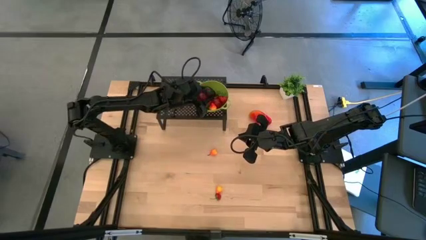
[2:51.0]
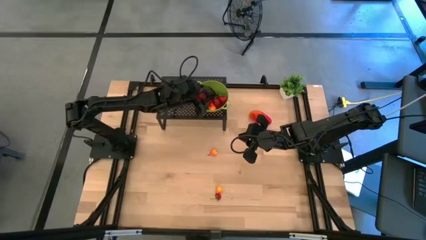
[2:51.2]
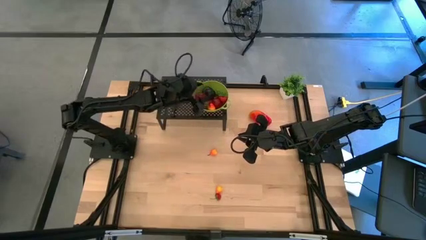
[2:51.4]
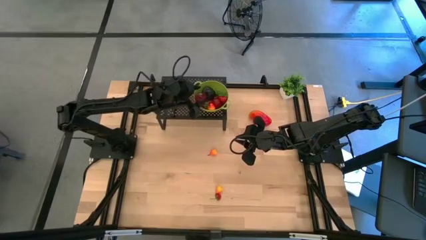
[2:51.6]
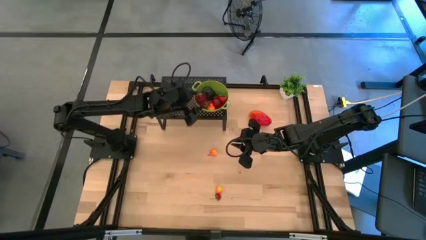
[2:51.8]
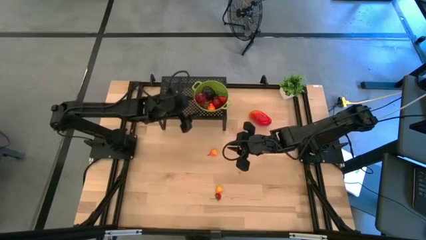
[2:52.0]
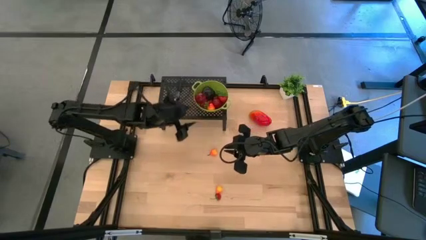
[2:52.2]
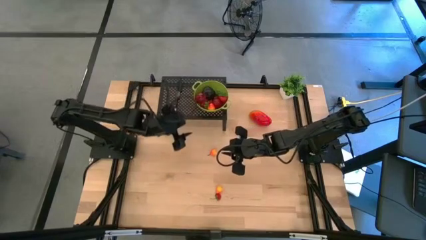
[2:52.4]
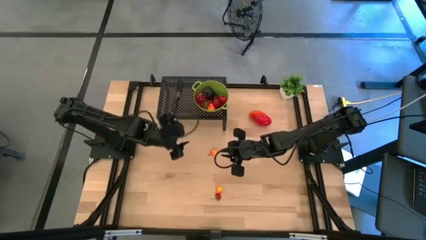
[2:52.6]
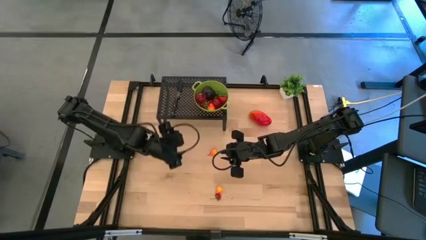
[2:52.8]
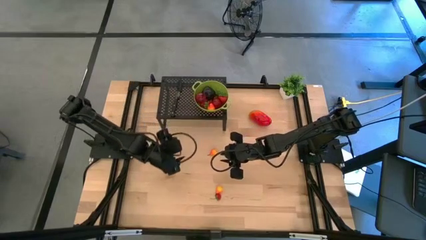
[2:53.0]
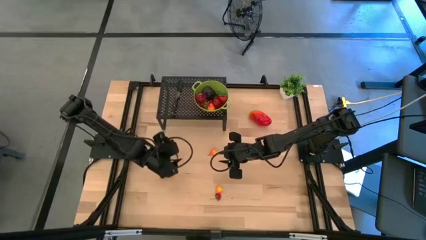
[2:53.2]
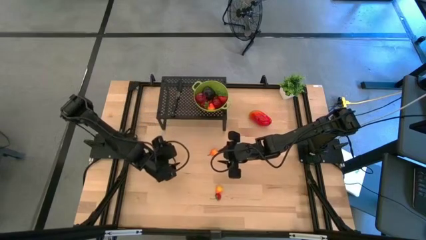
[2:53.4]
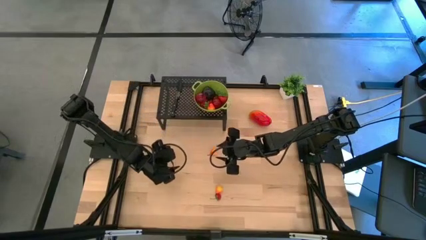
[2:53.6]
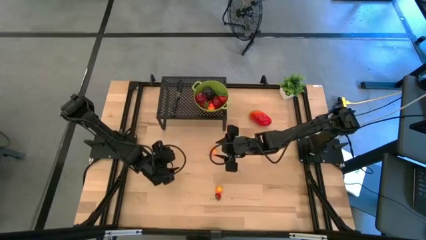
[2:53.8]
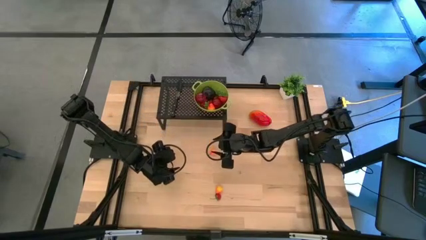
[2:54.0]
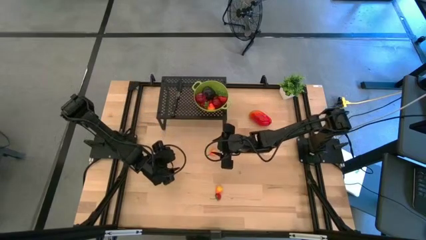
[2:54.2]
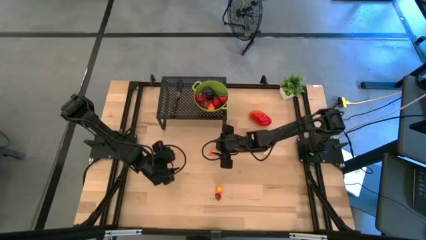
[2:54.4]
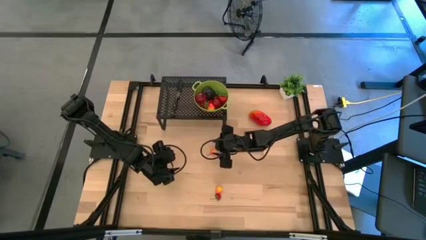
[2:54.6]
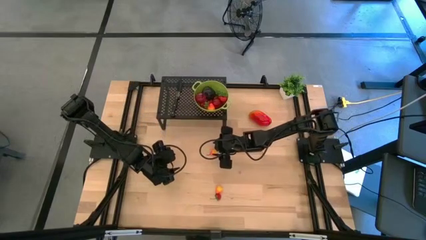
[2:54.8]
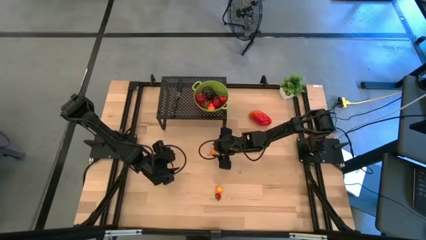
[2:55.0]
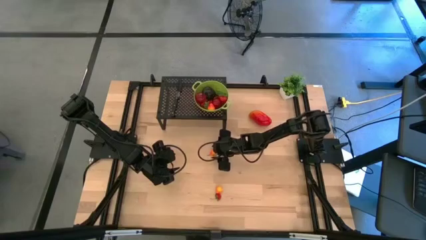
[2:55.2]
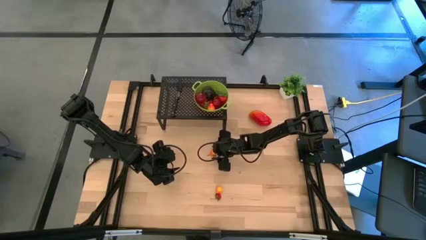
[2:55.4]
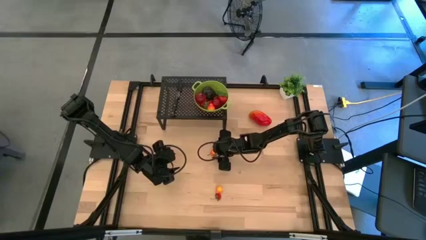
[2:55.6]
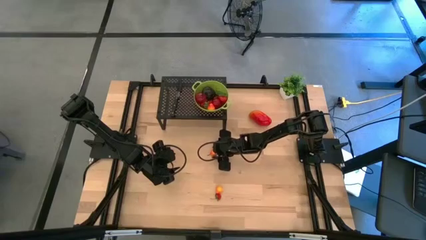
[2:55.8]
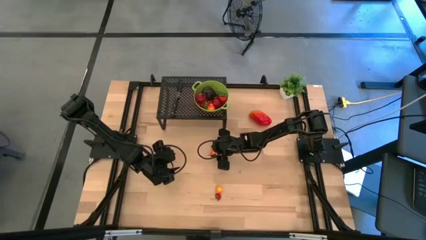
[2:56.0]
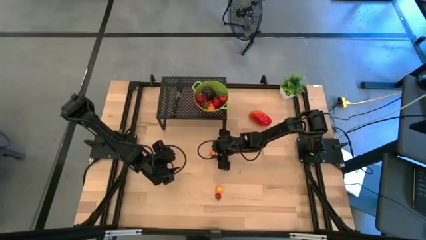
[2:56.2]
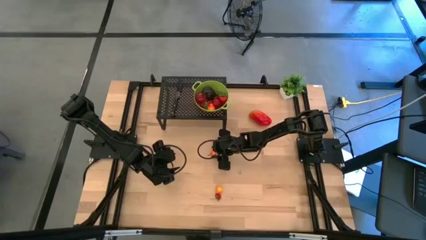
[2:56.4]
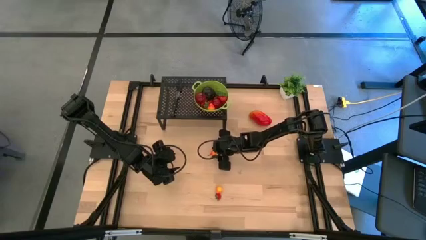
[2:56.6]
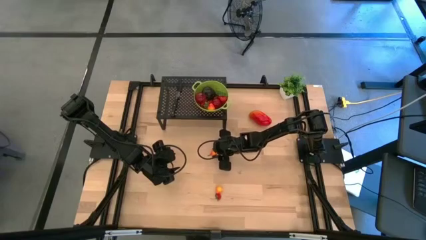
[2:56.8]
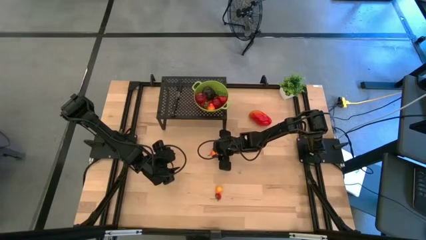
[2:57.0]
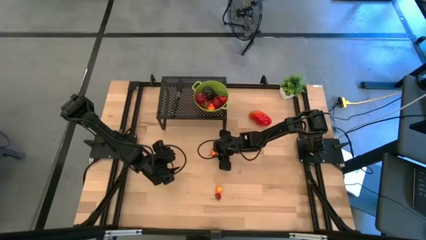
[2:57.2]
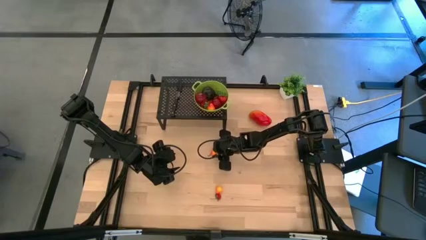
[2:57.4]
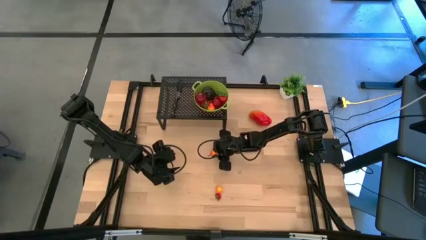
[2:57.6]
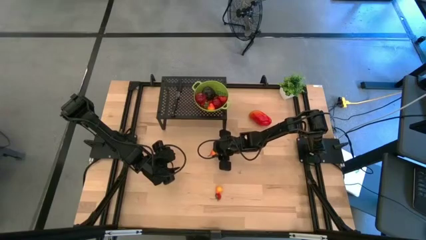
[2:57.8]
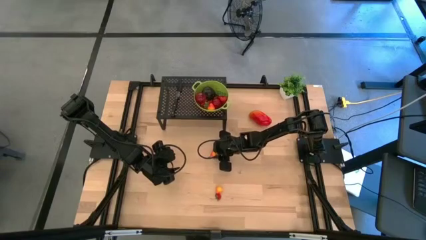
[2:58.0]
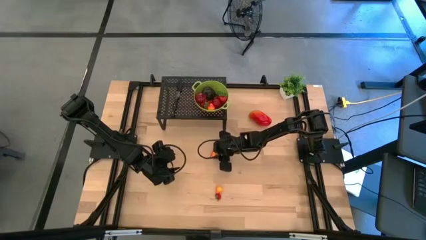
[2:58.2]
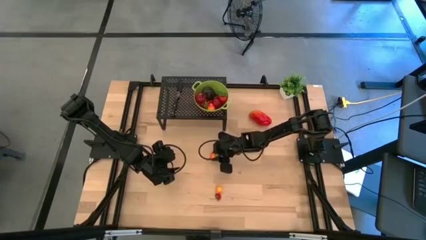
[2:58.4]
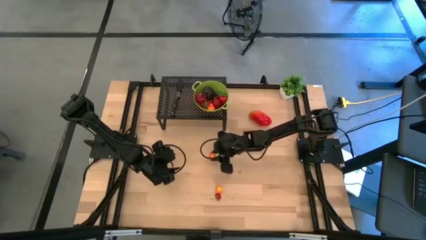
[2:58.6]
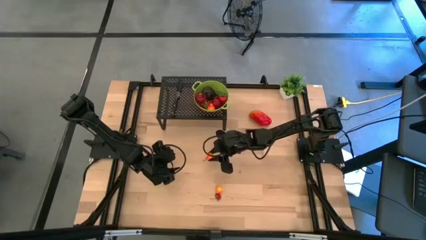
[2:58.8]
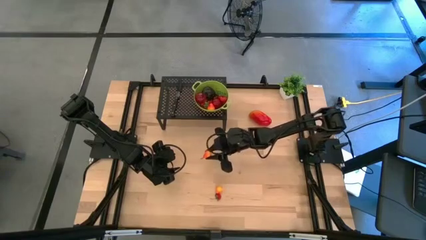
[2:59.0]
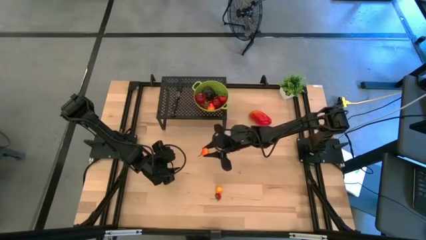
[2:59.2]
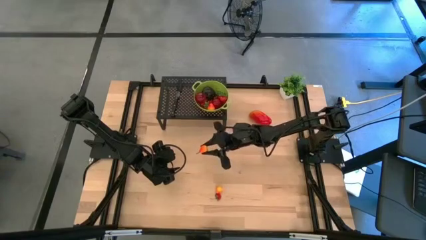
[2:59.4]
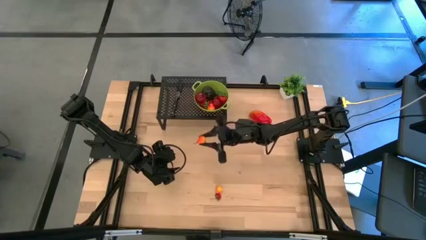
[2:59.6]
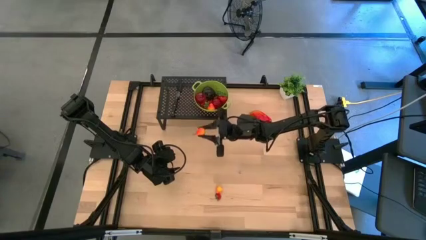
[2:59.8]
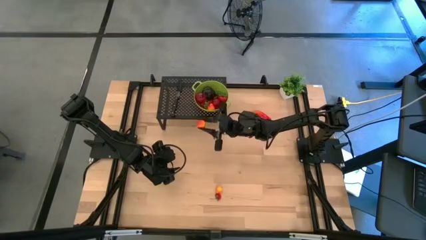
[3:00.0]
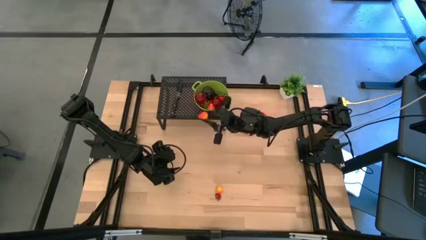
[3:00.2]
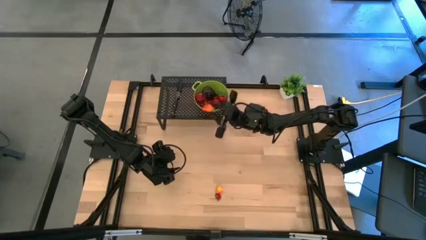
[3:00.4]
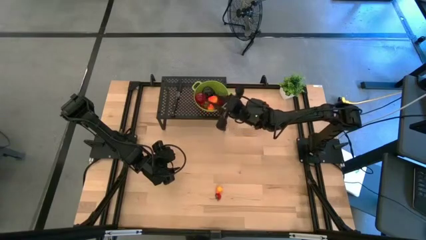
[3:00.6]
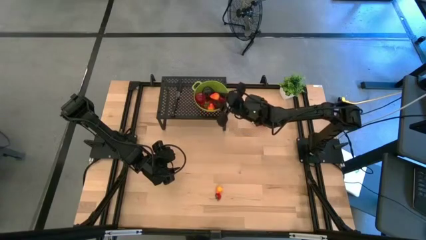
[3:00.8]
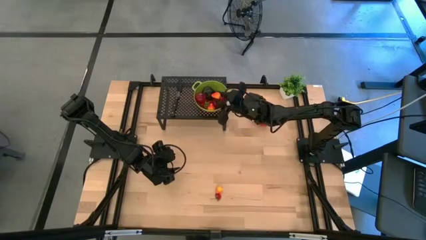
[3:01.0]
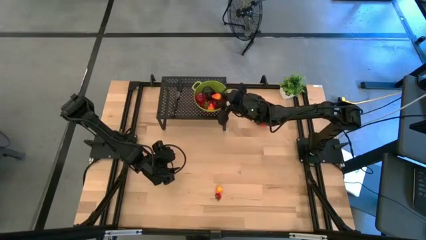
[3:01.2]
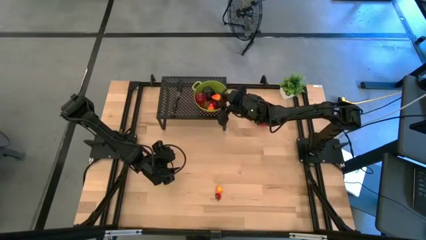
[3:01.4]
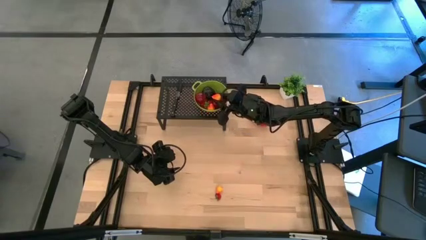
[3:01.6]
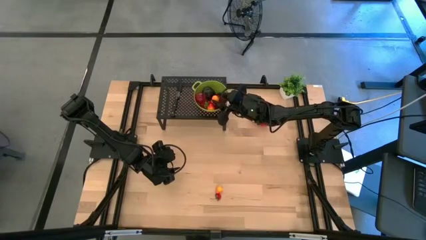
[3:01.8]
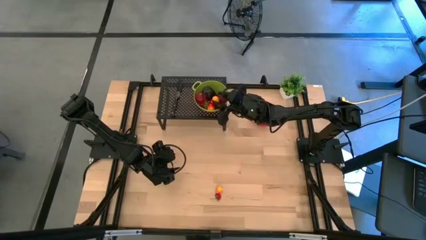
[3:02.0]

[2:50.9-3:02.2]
Task: Pick & Place Fruit
Put the pear into the green strainer bowl on the shelf

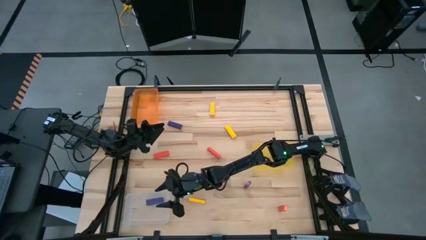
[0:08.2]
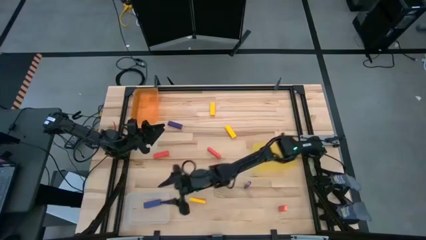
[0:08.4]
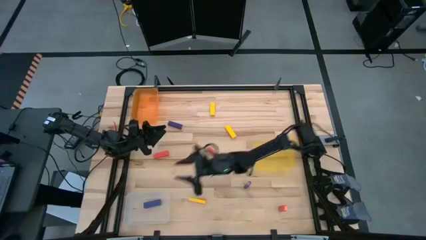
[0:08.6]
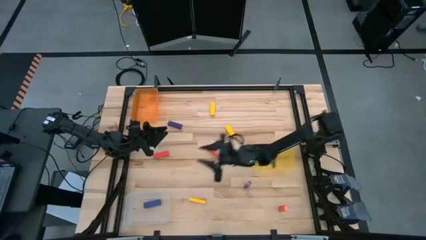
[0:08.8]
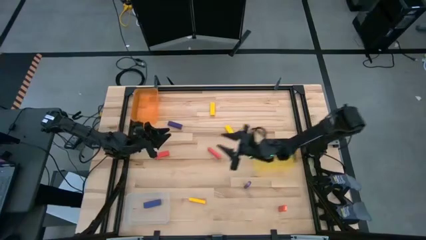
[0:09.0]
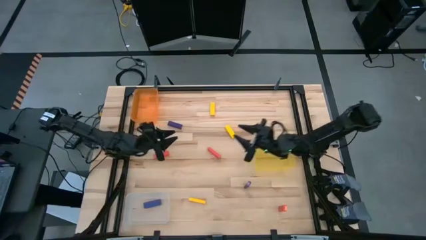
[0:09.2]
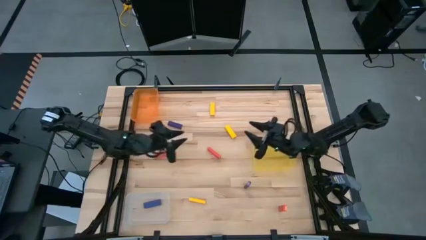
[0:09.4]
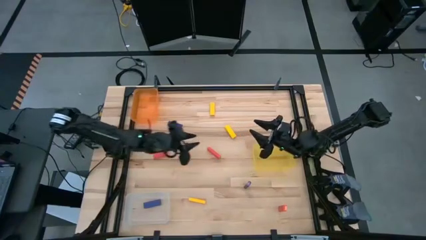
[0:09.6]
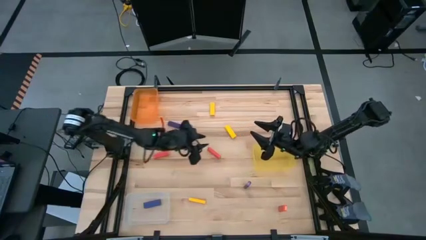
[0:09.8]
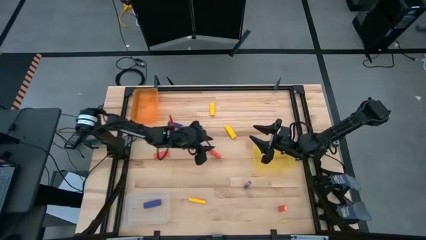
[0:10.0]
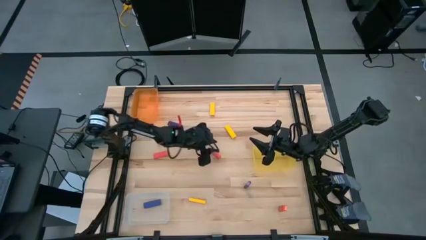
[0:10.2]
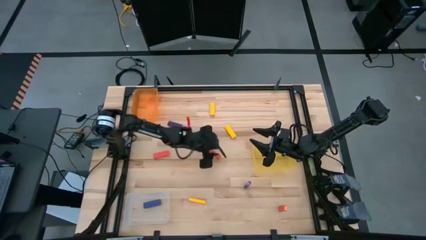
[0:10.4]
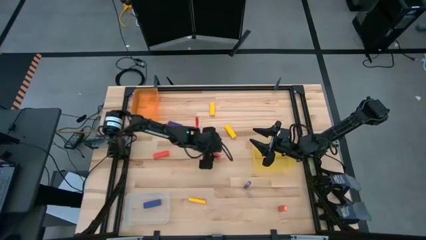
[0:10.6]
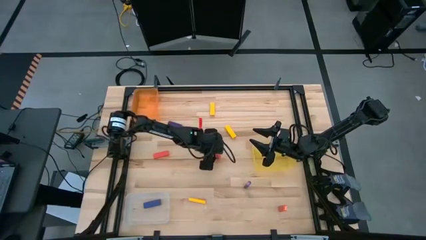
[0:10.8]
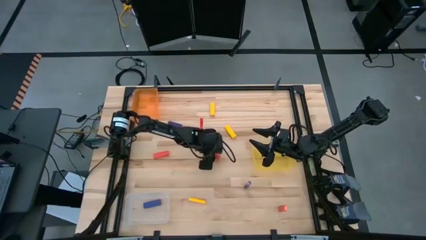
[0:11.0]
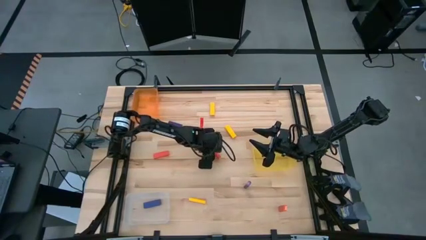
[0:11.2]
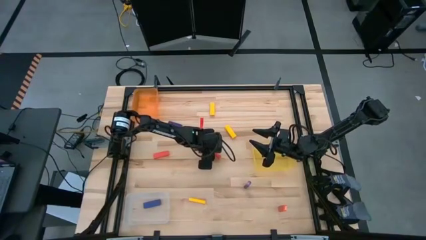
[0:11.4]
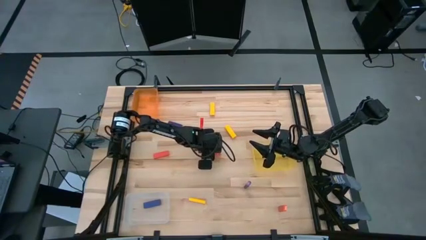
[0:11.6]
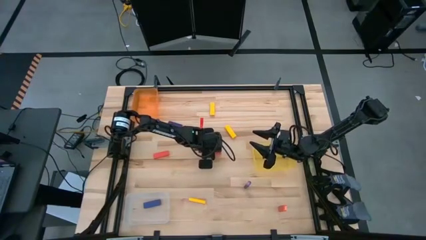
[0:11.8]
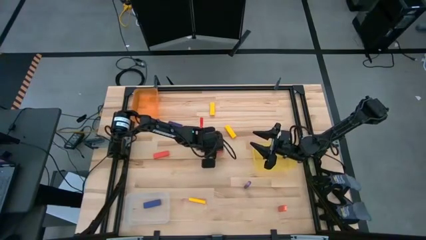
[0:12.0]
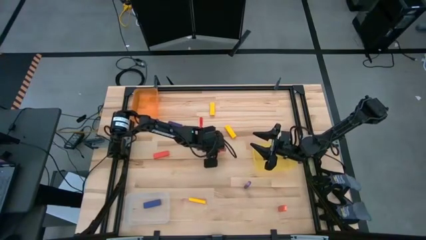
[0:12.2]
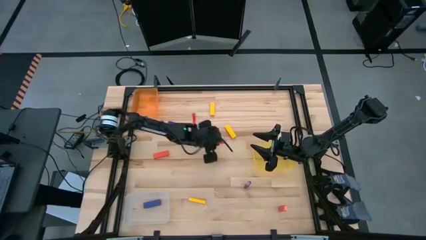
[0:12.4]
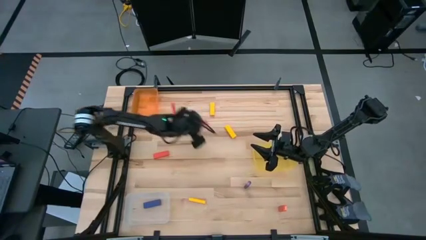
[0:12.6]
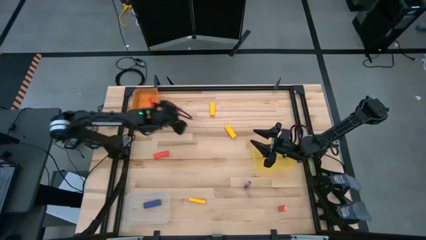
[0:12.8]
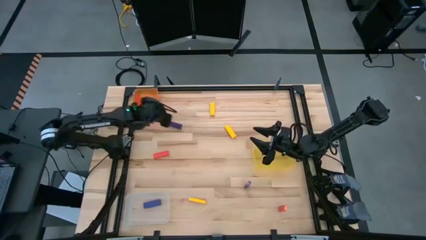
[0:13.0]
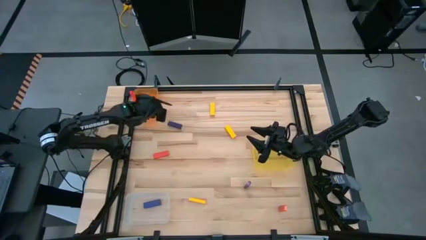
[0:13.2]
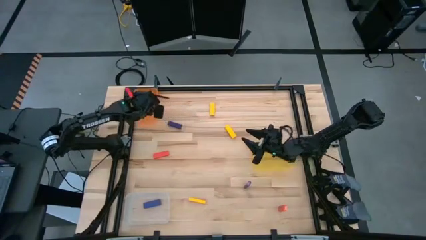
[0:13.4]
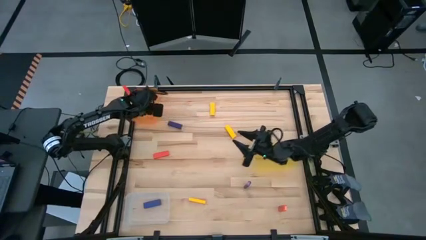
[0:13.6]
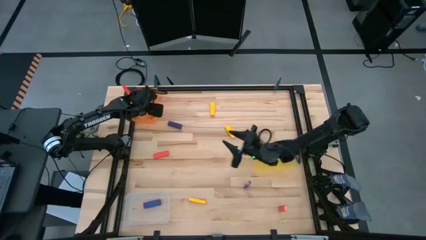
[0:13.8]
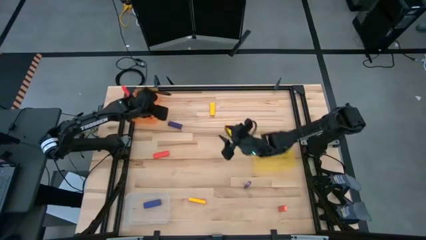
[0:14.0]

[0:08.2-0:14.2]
Task: Sort blocks
Put the top middle orange block into the orange transparent bin
